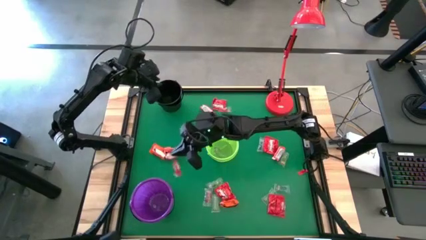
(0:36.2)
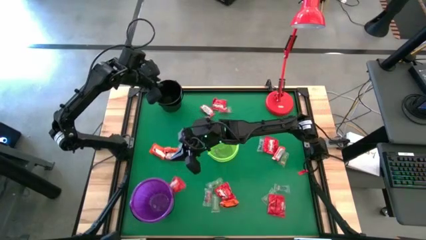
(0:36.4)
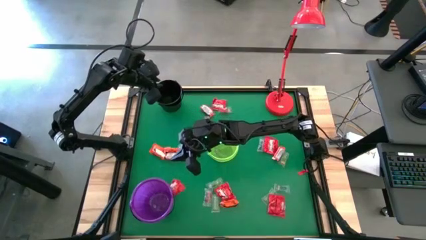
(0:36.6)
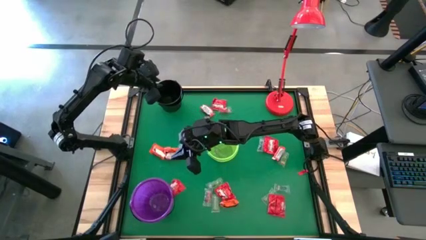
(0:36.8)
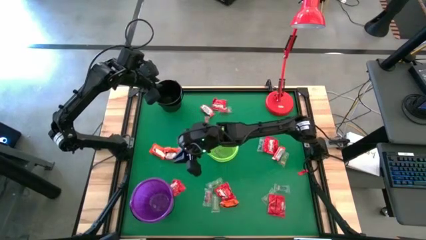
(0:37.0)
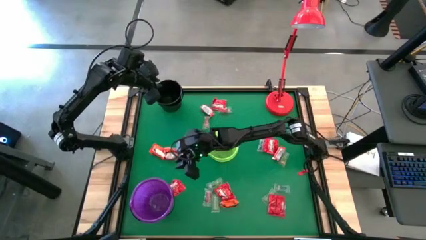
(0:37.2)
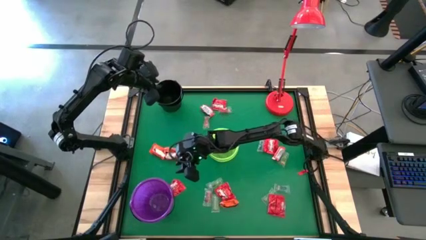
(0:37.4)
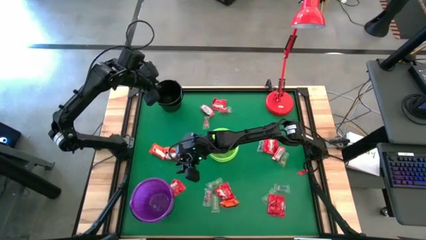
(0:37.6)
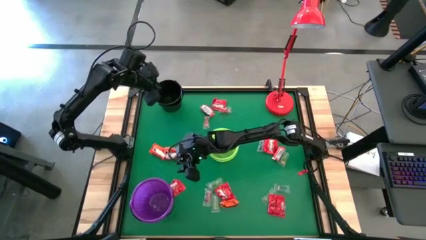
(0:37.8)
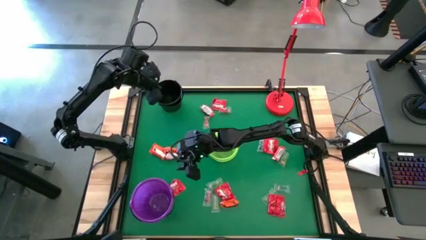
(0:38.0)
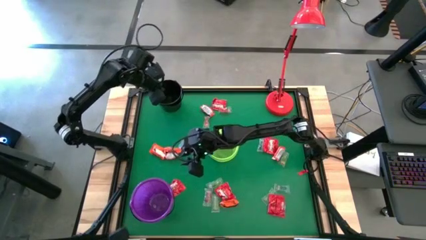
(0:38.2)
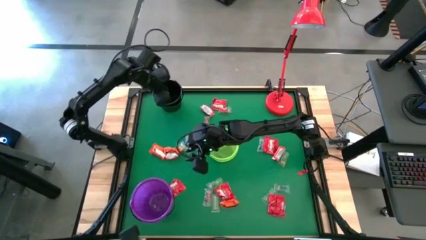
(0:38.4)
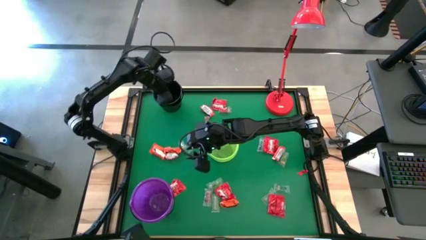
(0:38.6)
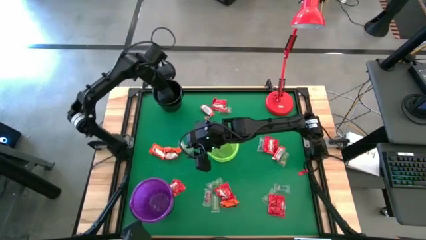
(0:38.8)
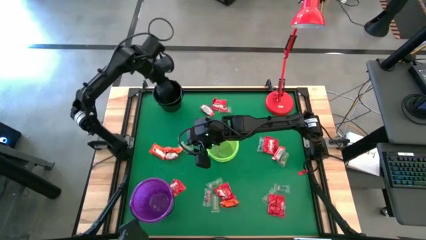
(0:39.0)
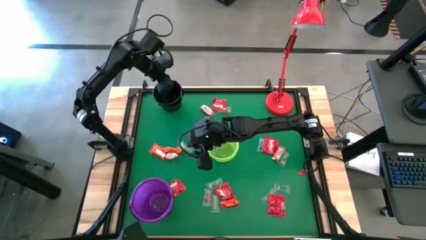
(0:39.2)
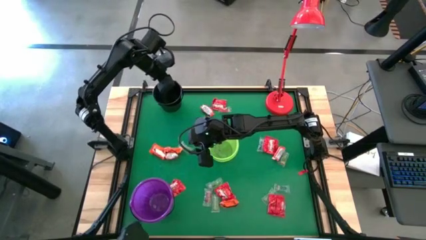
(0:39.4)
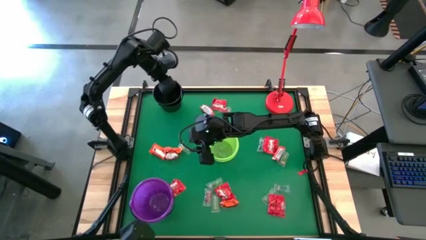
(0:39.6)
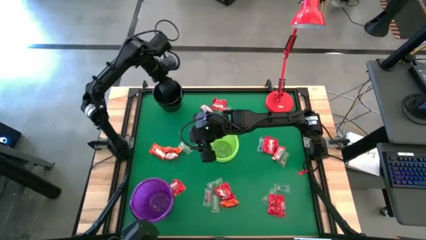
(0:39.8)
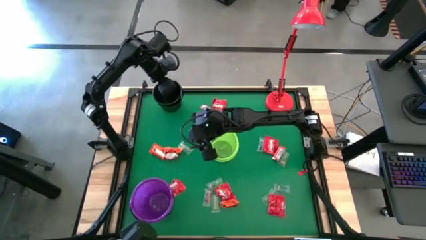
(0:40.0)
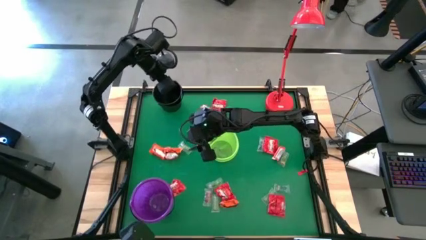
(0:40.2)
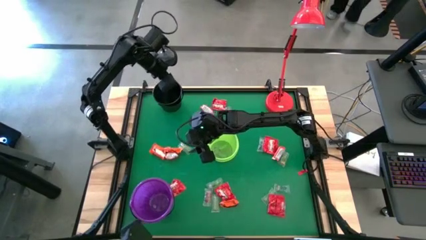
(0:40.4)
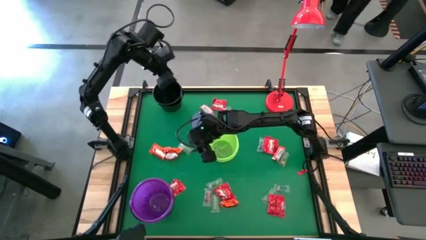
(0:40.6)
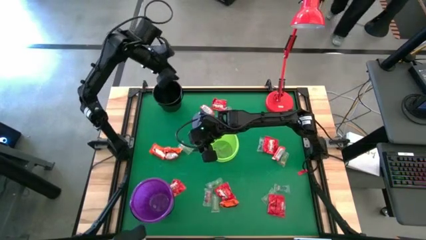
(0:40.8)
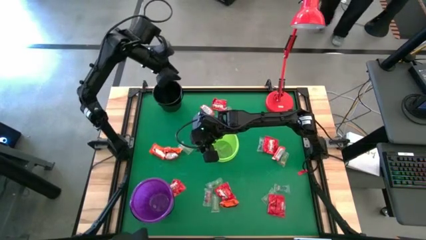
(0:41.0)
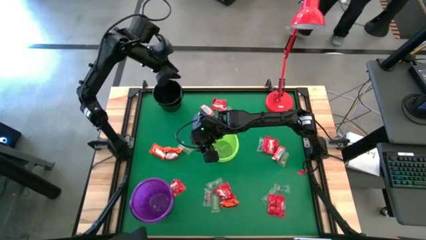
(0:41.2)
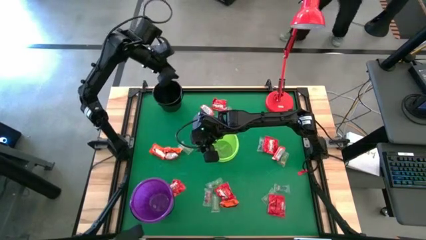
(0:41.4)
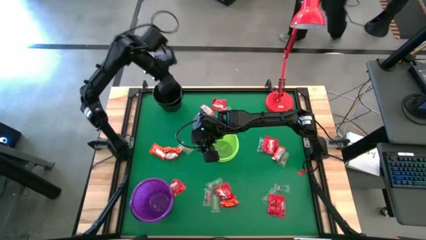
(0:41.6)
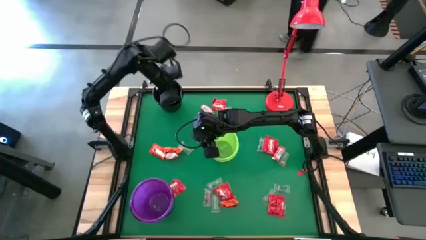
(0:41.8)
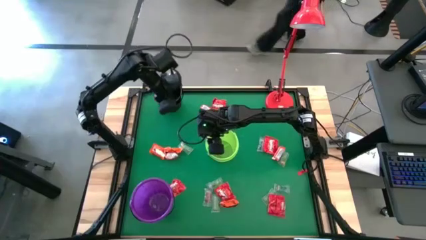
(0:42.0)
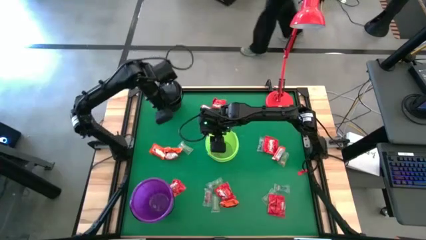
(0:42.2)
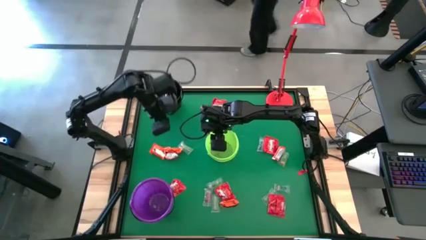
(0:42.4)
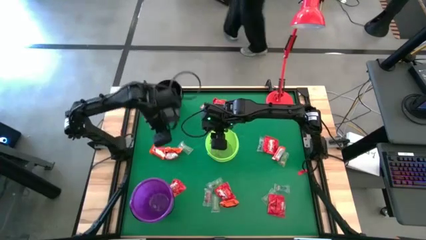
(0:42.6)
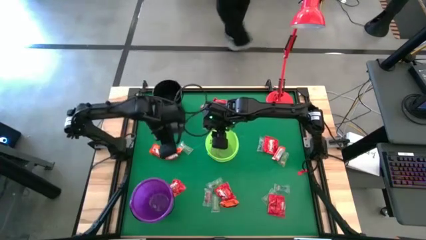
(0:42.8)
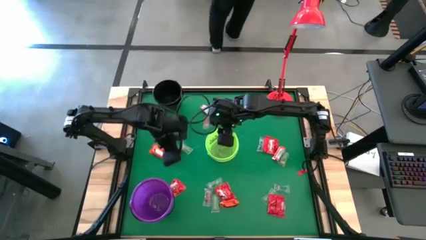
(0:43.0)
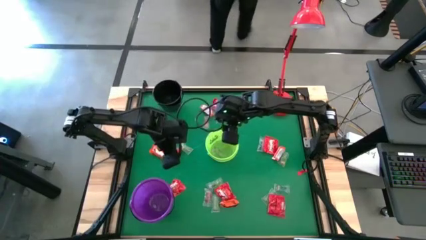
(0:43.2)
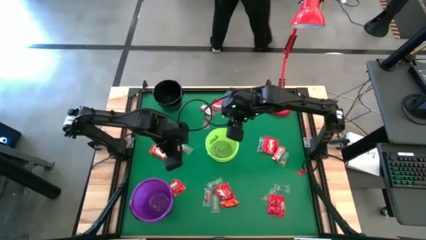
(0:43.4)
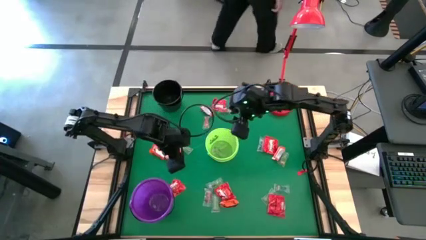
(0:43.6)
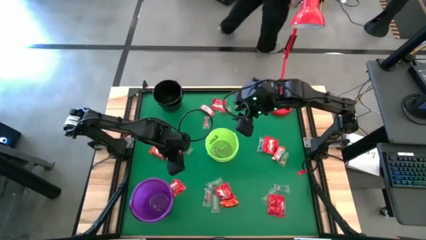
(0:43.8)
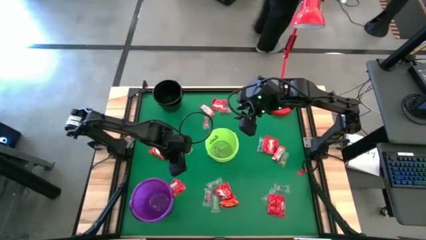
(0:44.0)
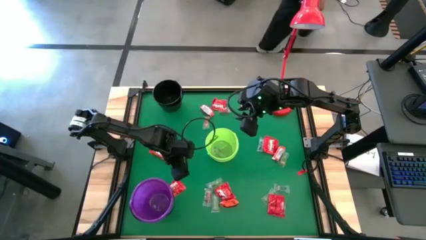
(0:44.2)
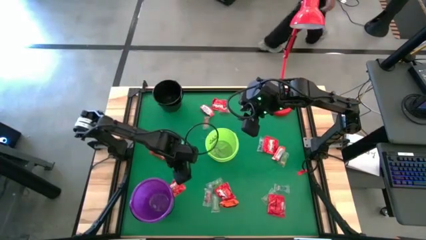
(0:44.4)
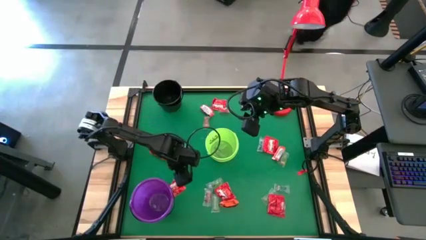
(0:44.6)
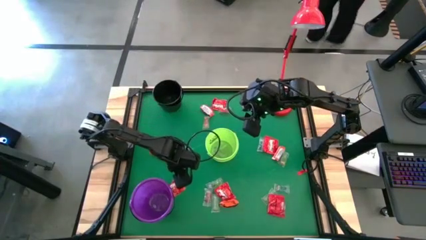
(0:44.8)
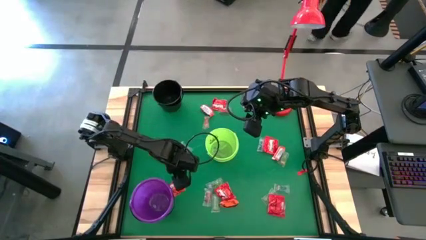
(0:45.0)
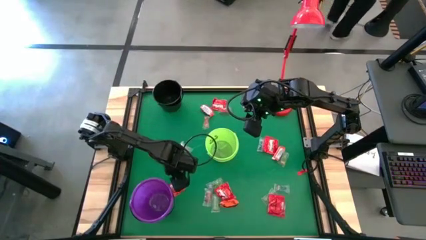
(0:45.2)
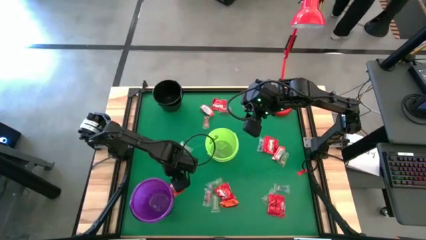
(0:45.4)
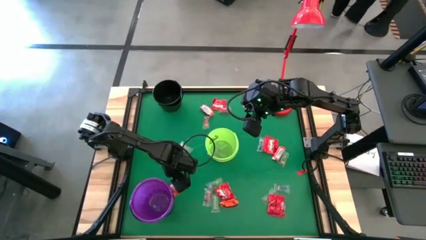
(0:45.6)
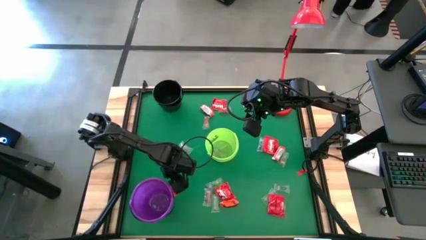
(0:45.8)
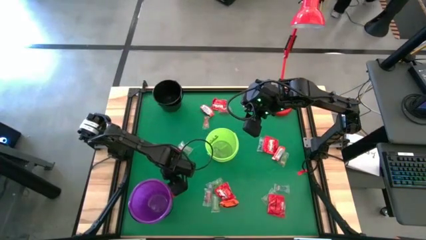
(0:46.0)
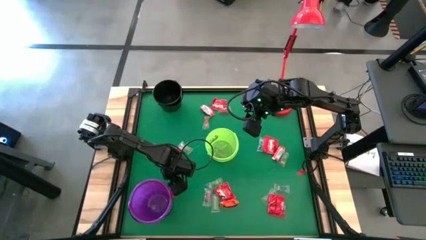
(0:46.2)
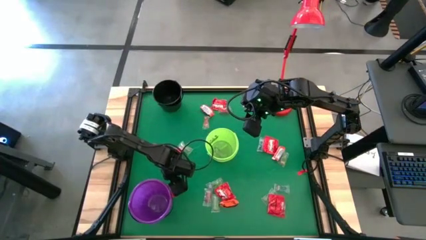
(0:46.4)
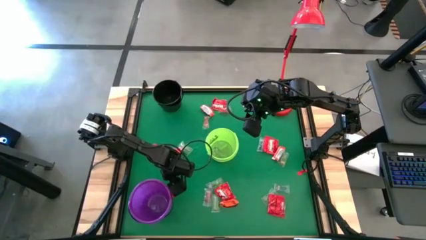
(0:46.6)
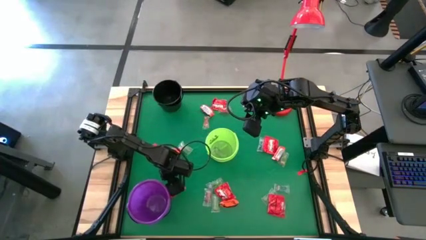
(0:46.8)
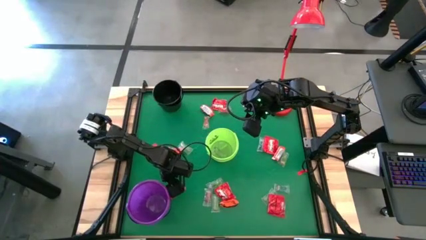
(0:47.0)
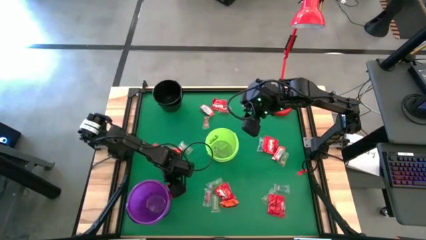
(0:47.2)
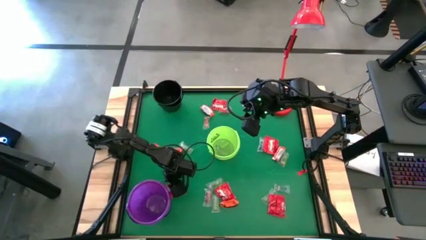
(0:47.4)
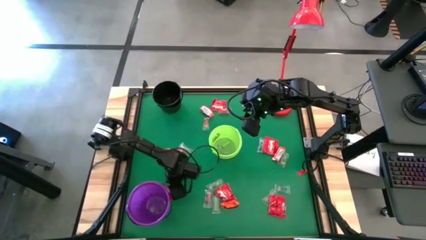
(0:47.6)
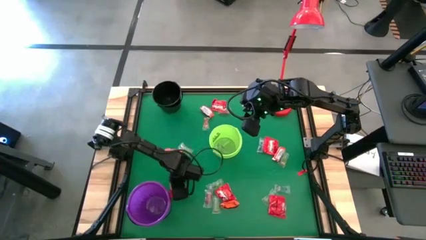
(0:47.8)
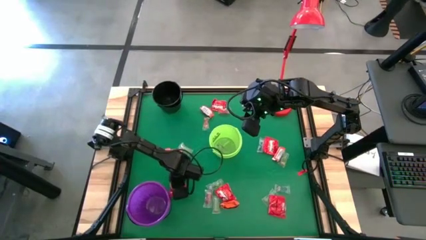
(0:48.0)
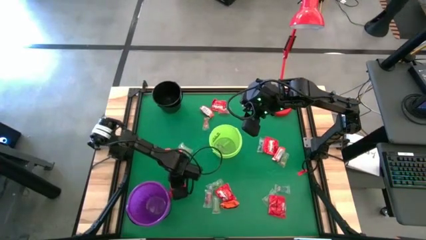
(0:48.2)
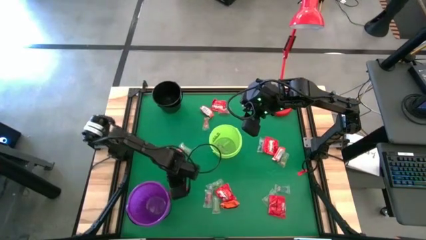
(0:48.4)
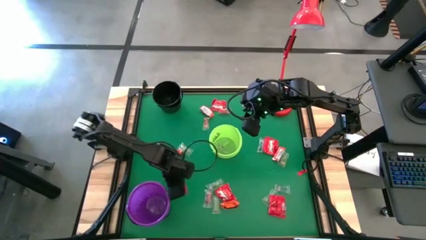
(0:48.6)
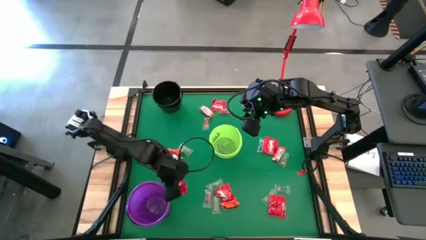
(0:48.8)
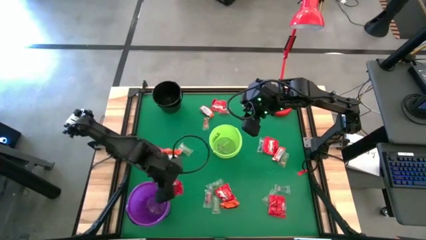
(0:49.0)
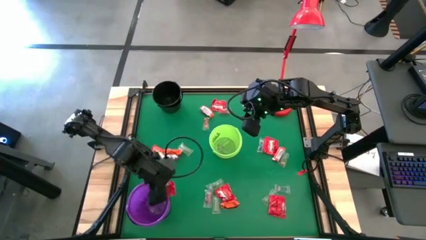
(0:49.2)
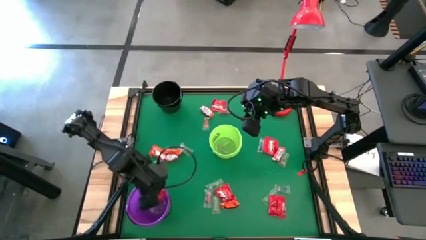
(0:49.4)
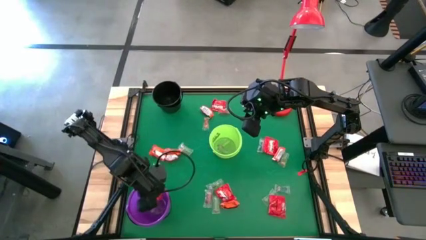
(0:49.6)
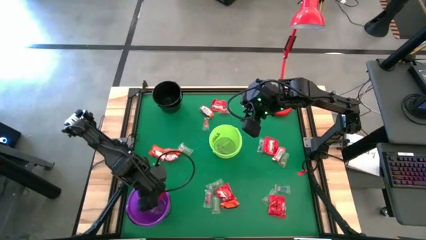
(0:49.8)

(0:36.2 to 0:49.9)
Task: Sort candy
Put the red candy into the violet bucket

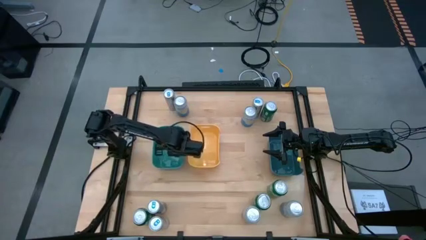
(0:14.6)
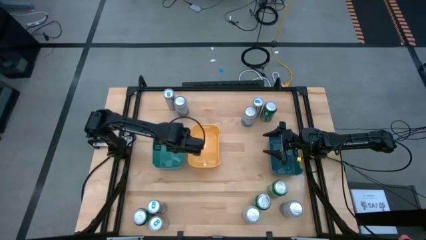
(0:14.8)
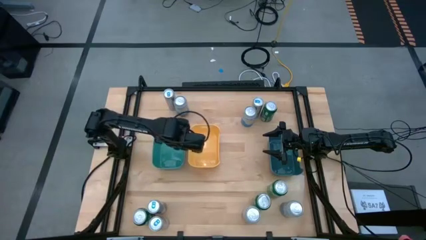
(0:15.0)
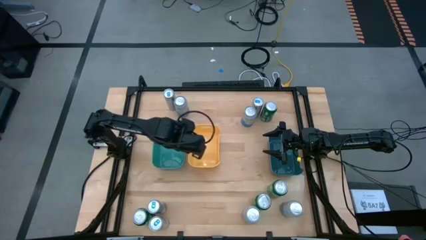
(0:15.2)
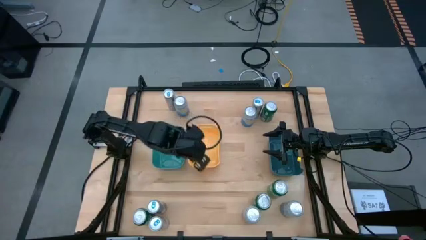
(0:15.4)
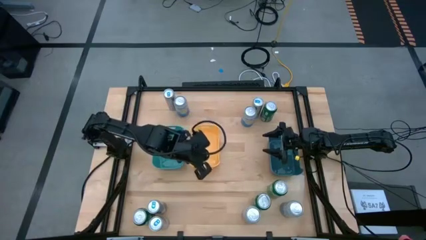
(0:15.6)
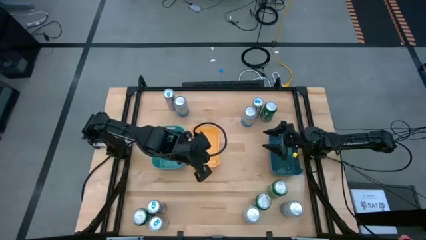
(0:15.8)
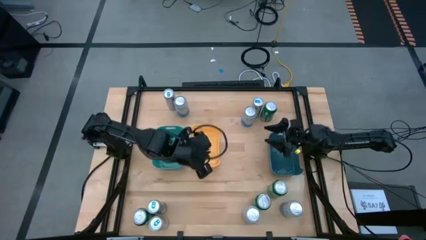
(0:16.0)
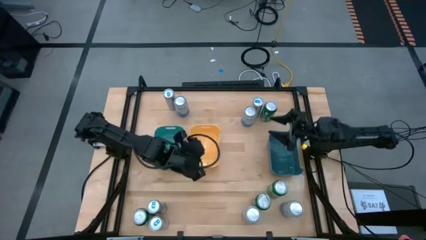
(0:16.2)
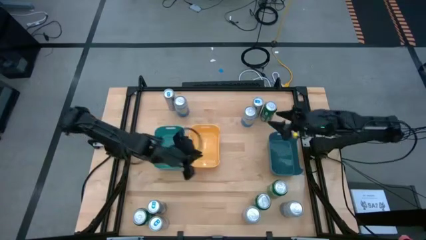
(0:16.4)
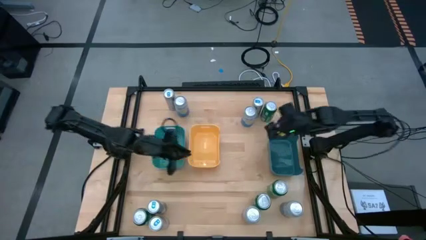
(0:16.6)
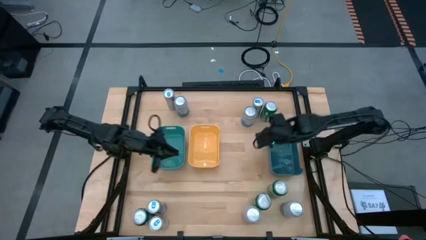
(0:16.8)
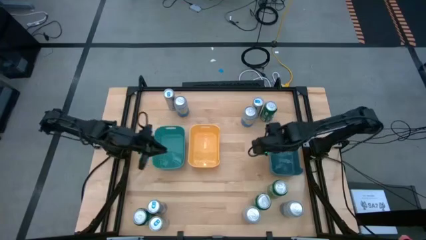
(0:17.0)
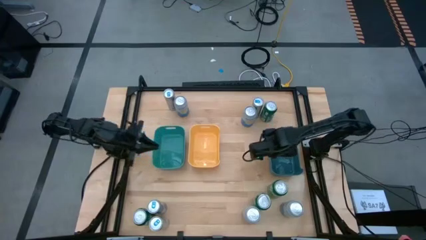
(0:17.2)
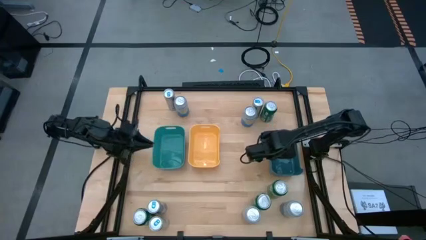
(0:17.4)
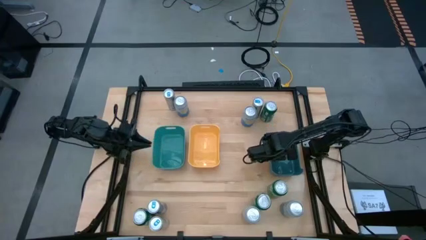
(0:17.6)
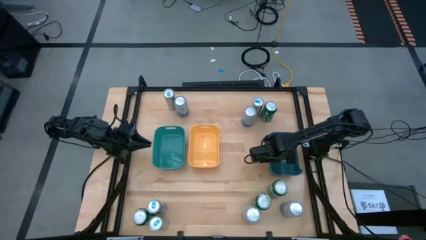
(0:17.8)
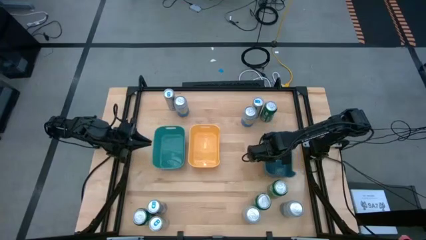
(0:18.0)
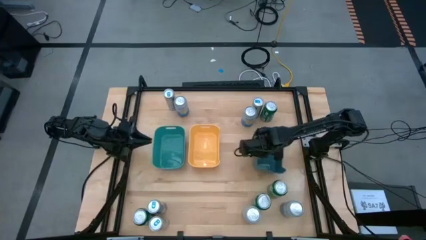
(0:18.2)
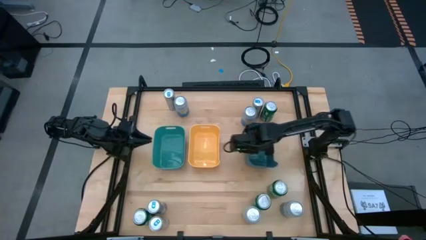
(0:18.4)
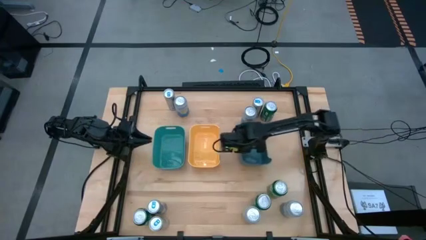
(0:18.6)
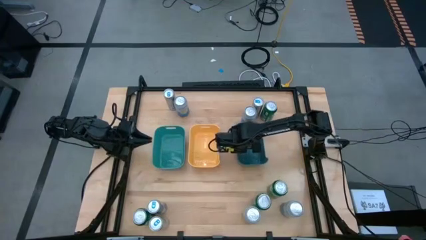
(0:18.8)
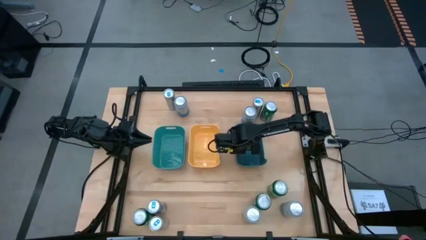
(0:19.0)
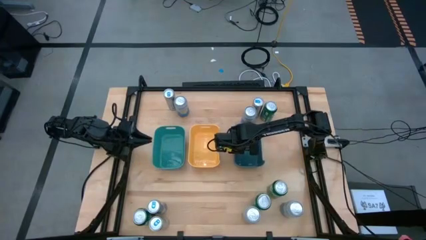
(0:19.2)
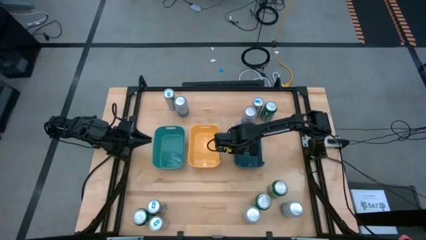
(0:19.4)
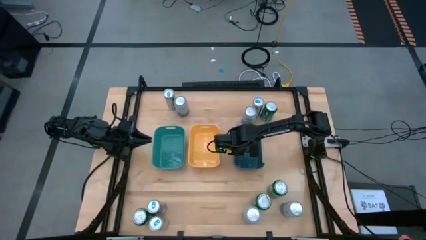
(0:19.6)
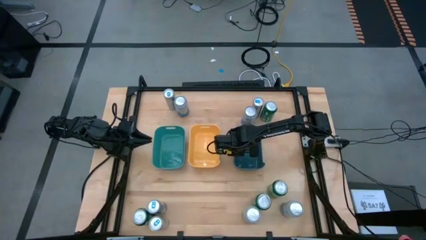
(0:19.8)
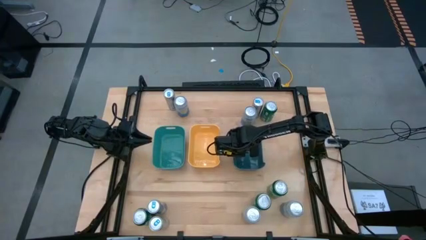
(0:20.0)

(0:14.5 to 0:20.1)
Task: Sort soda cans
Move the blue bin to the right of the yellow bin
